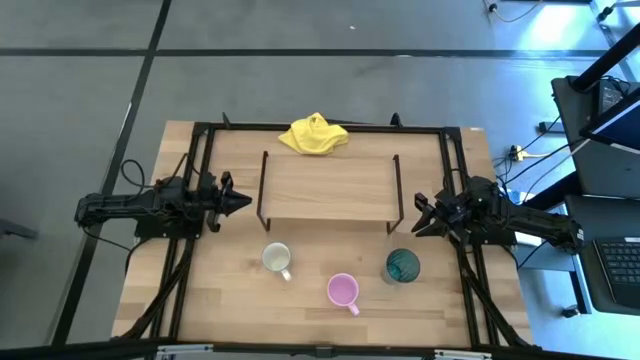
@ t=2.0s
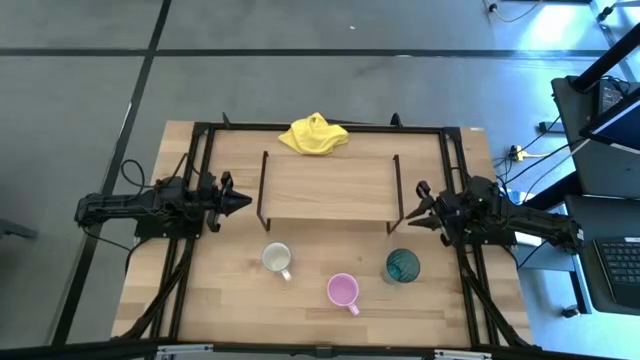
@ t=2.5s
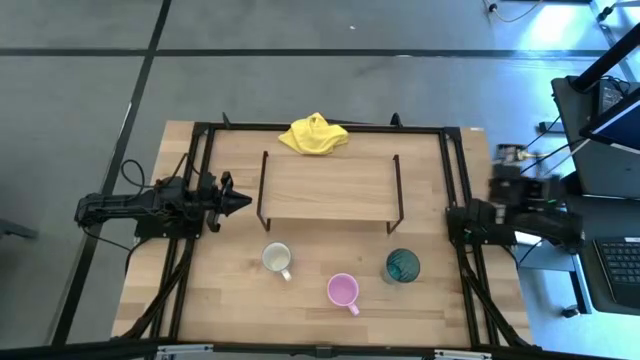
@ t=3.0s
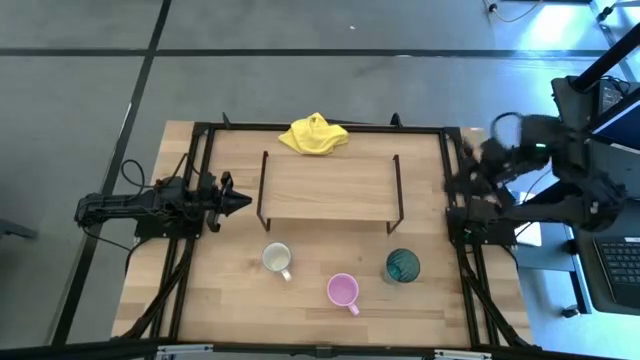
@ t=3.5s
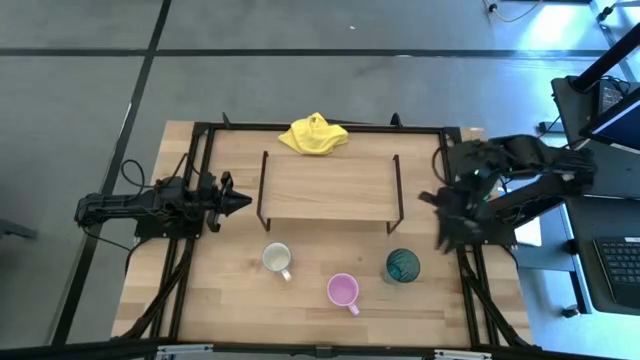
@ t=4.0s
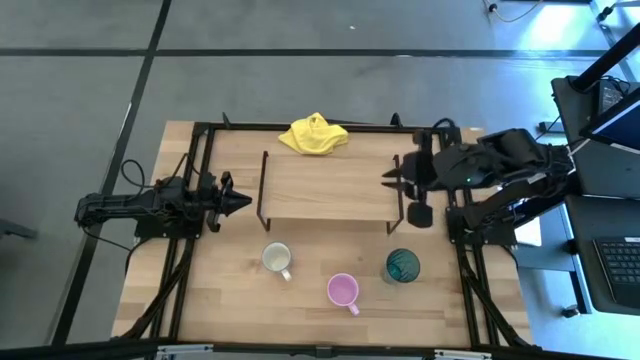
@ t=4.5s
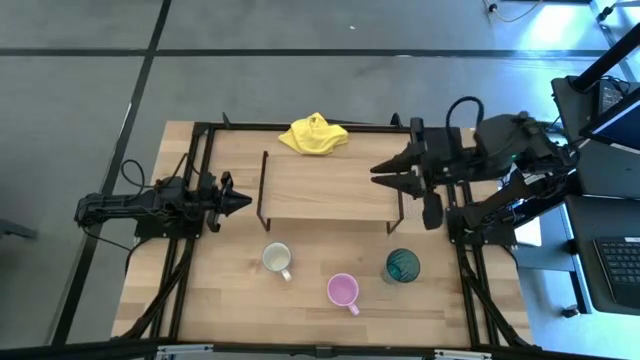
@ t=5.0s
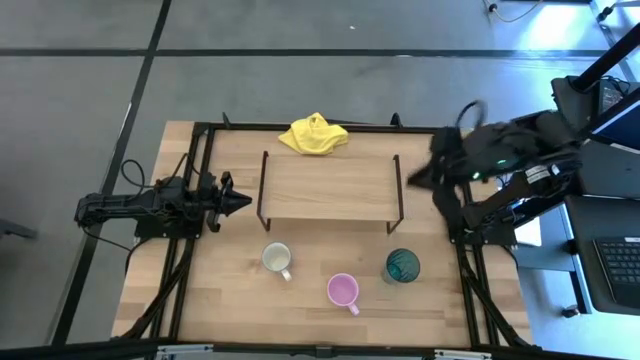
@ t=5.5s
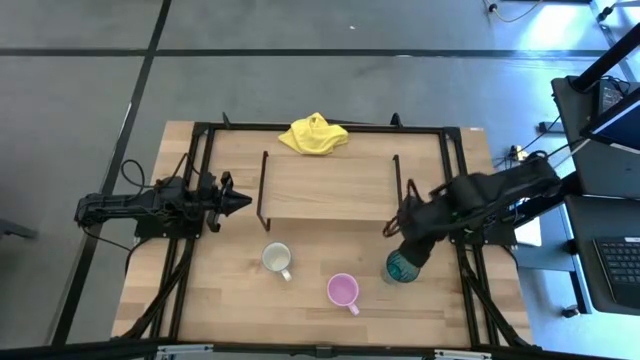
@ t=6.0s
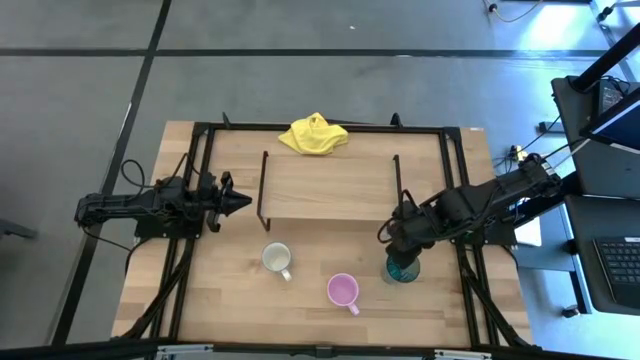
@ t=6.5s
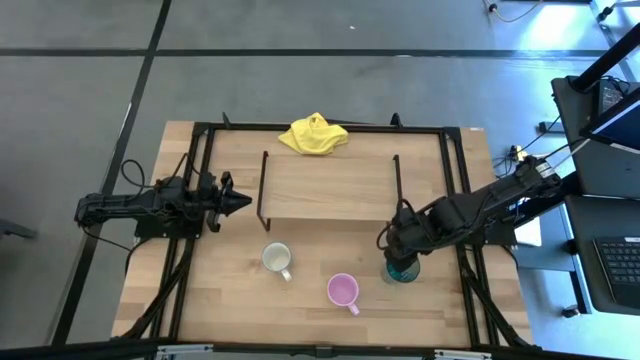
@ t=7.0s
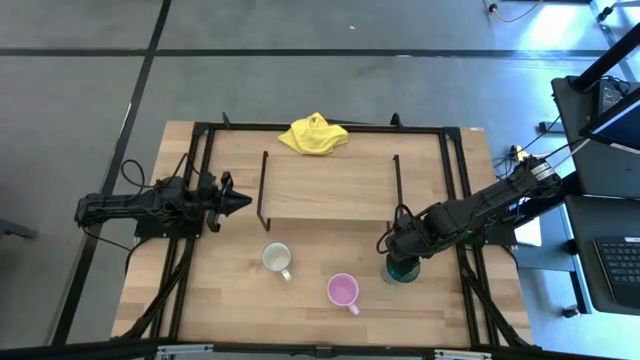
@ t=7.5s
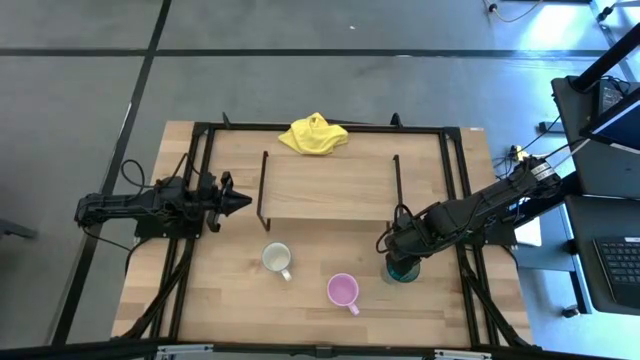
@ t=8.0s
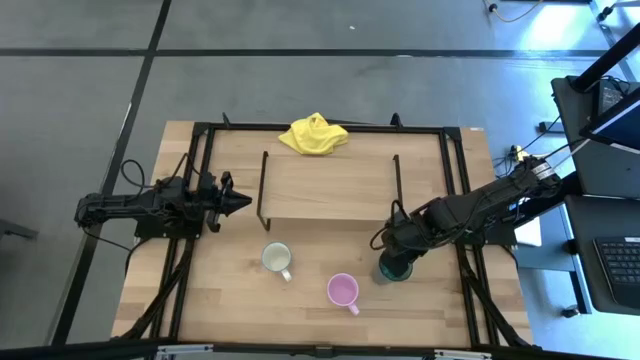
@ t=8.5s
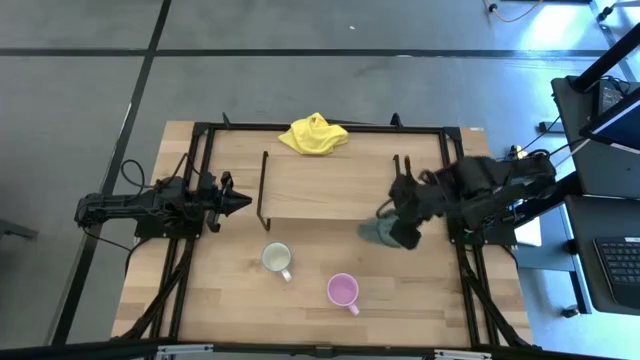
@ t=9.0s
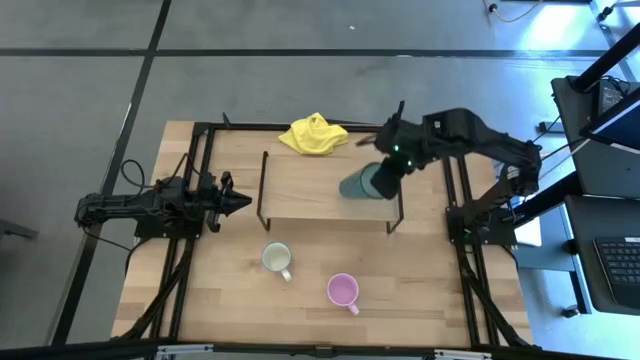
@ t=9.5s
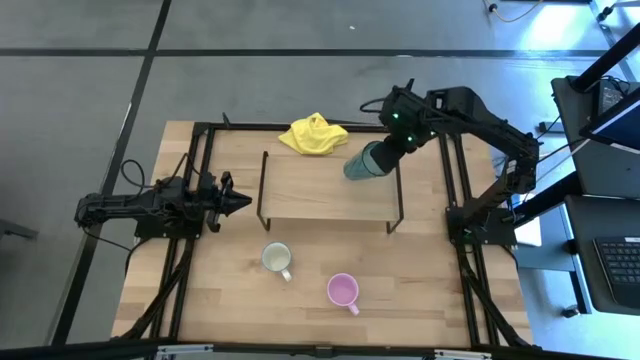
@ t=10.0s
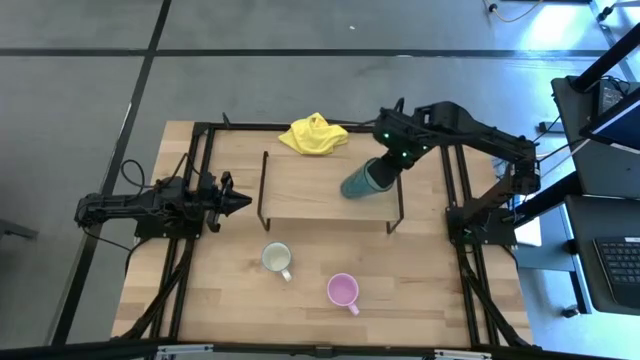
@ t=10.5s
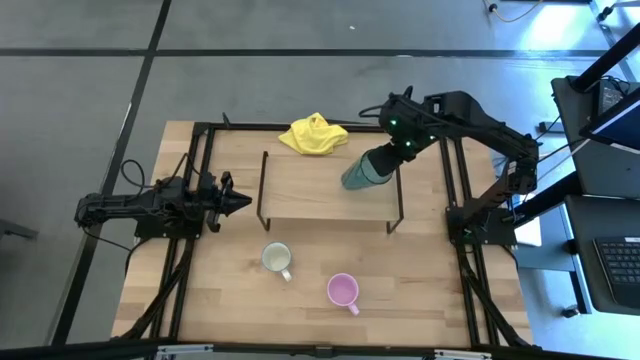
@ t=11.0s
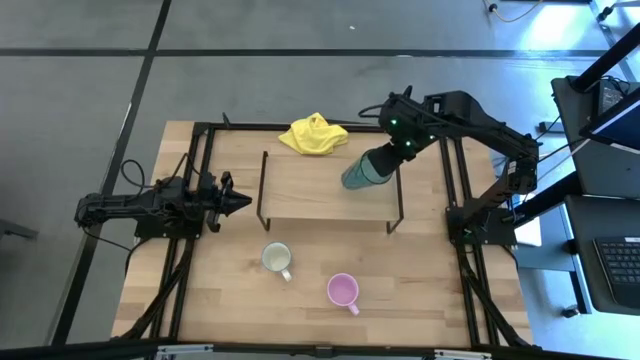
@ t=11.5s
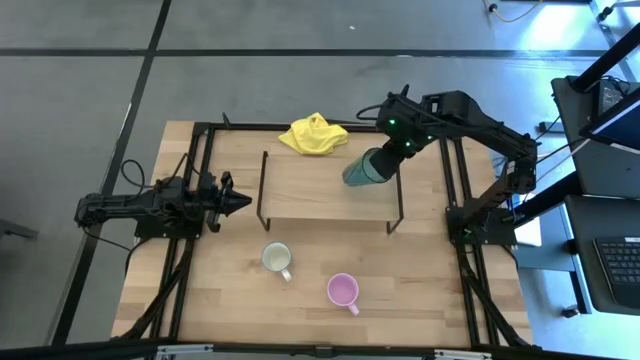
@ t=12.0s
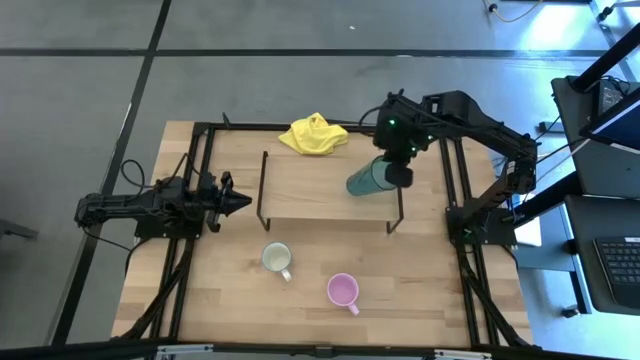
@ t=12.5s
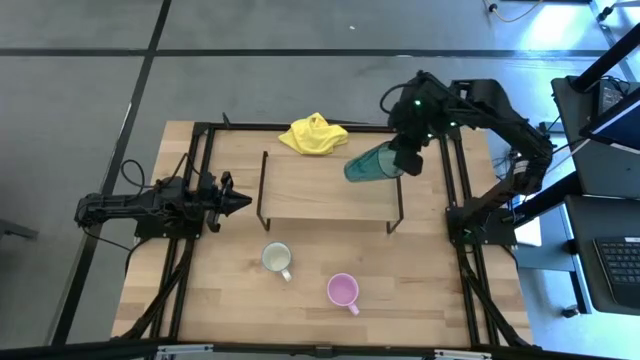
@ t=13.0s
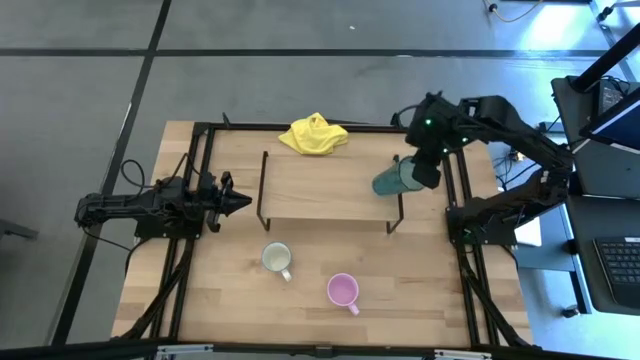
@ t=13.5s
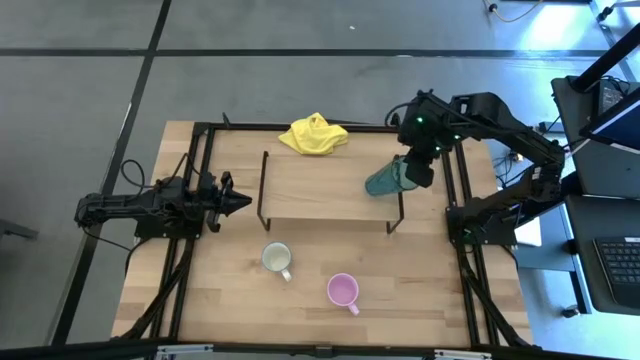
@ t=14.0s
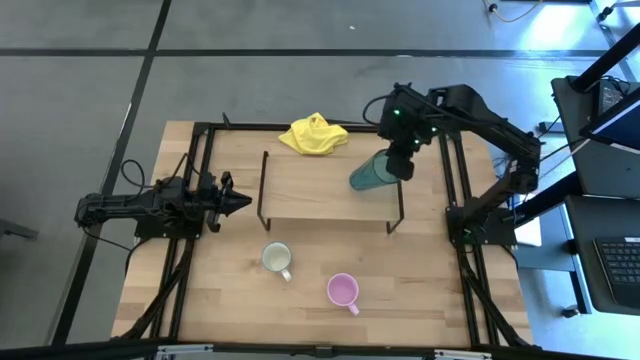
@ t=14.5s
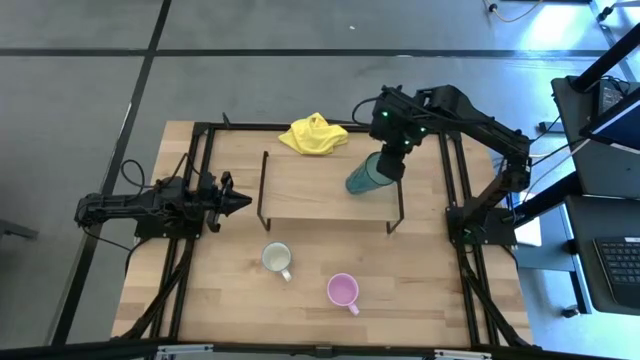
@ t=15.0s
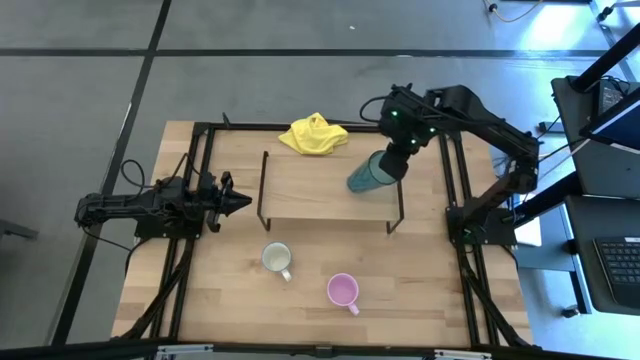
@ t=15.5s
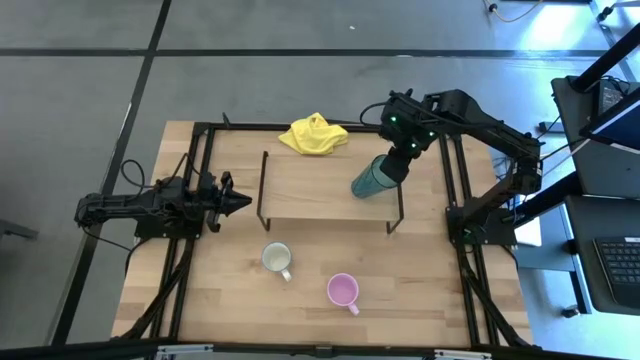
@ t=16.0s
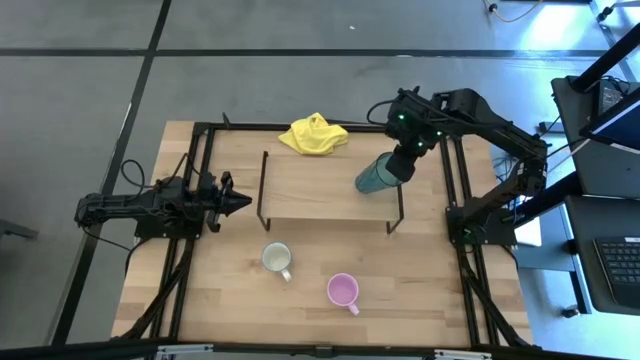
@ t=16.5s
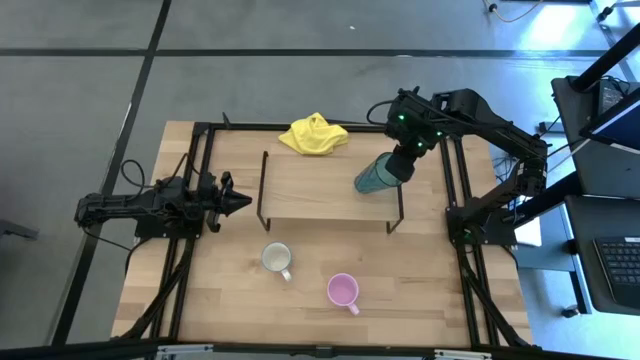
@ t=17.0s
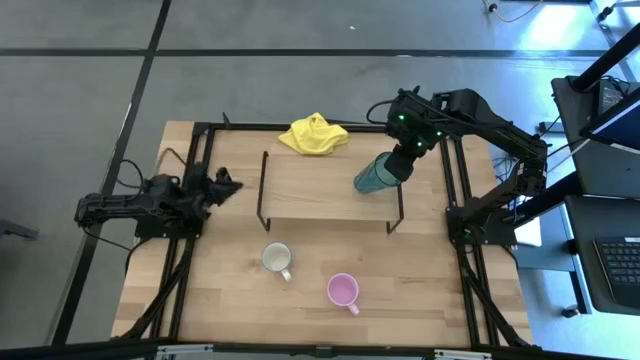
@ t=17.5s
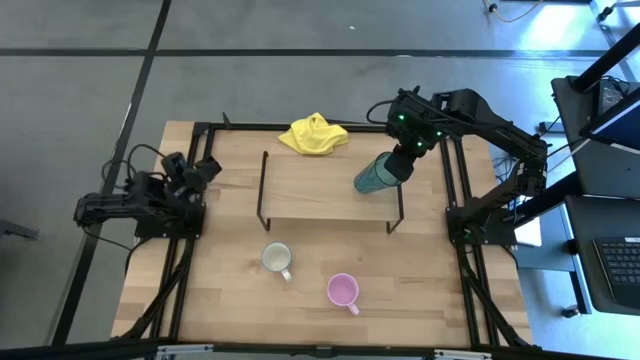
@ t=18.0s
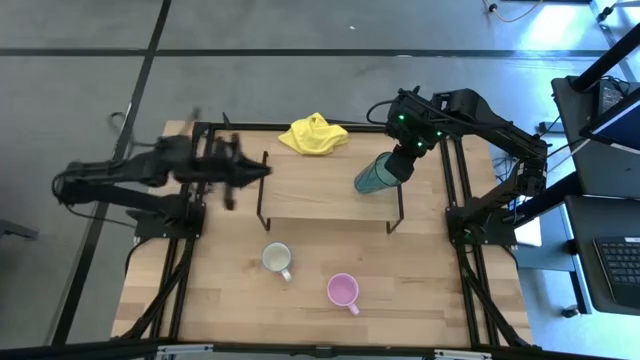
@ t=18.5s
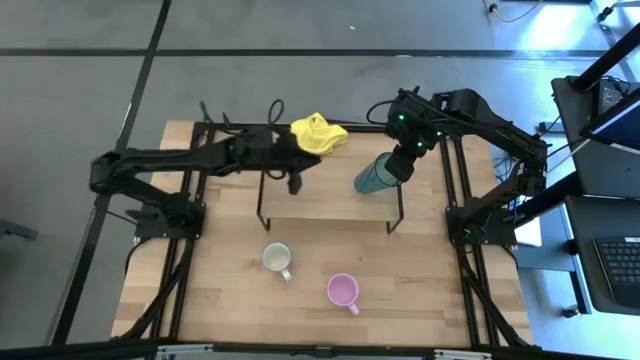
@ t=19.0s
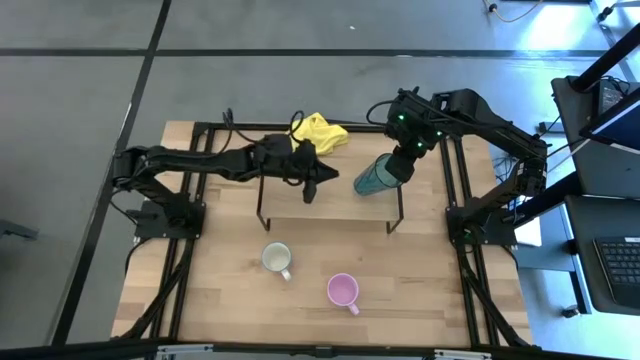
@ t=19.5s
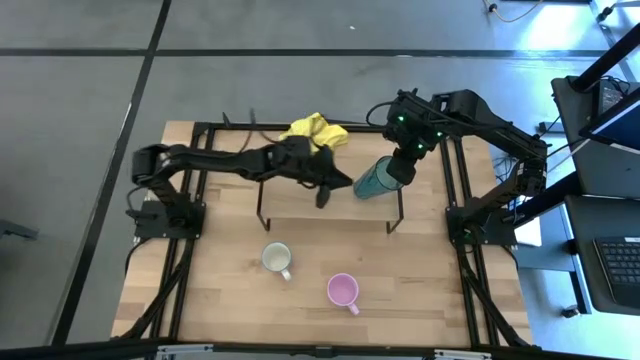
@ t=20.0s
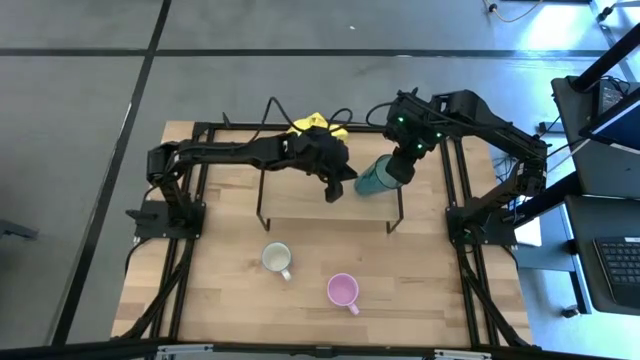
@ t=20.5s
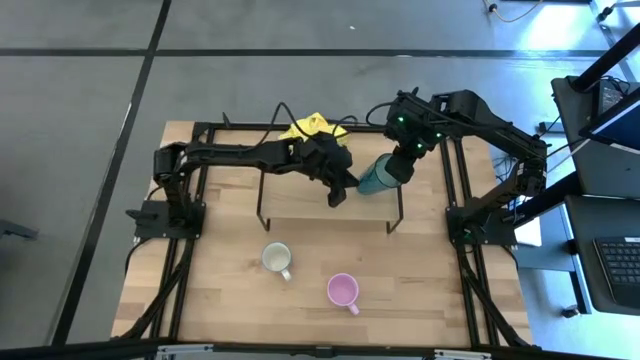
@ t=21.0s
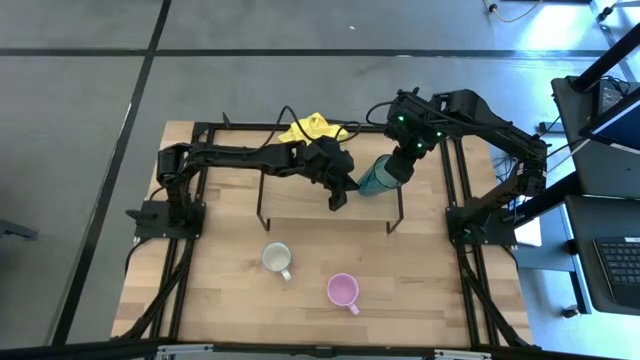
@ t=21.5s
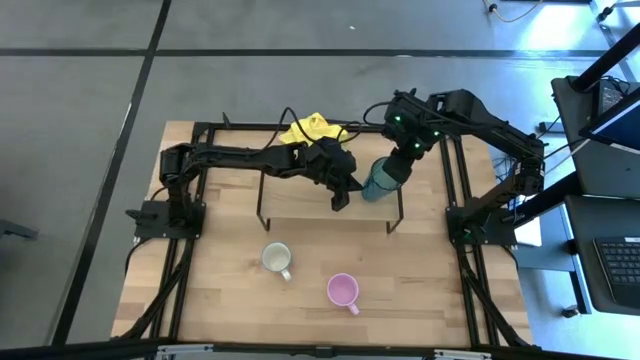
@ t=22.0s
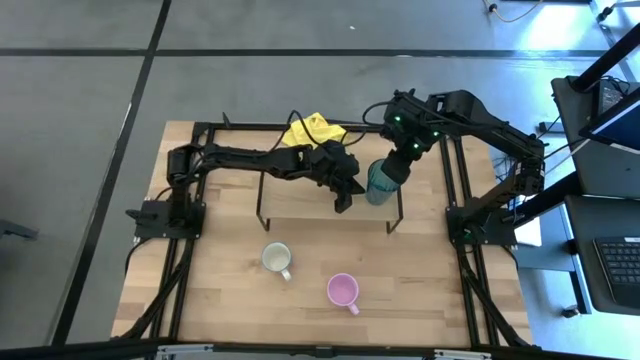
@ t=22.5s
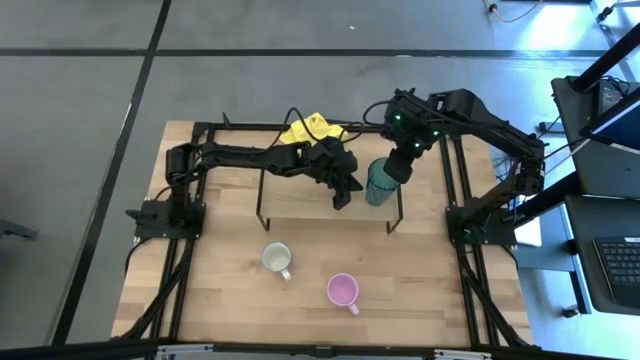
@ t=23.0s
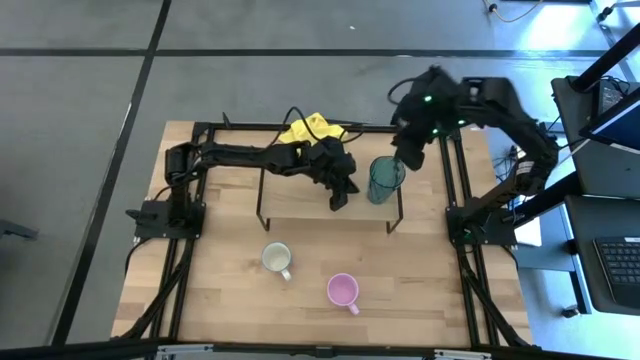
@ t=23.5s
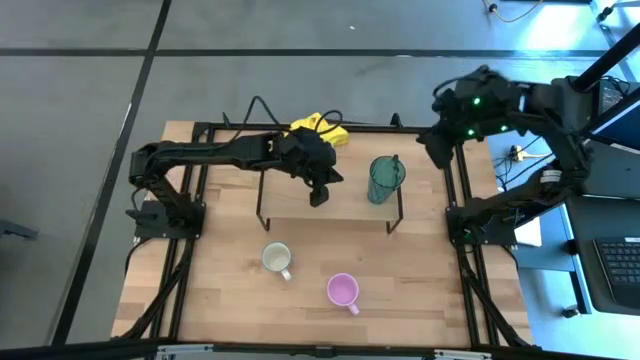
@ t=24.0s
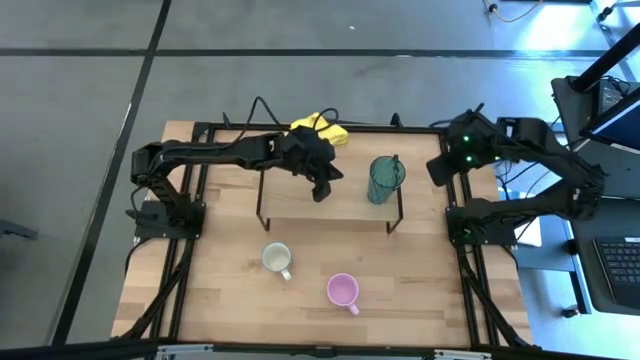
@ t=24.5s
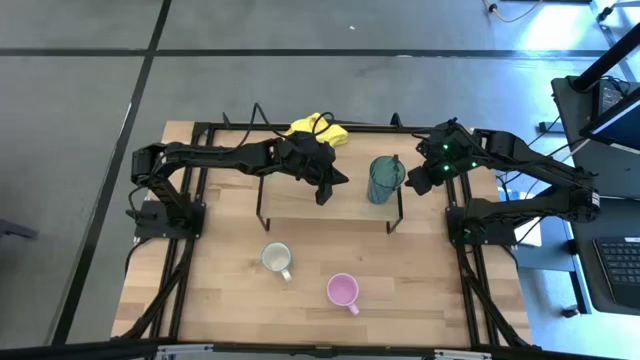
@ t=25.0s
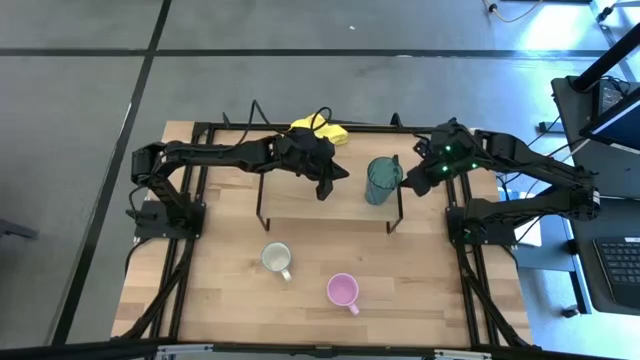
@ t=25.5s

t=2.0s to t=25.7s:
Task: Stack small to large cups/mugs on shelf
Put the blue glass on the shelf
